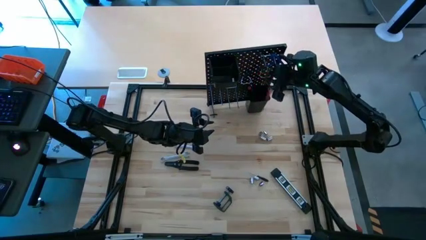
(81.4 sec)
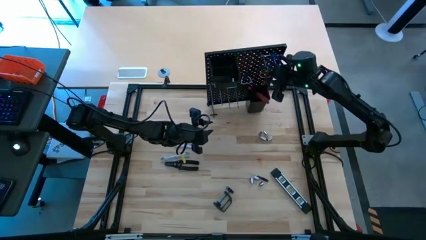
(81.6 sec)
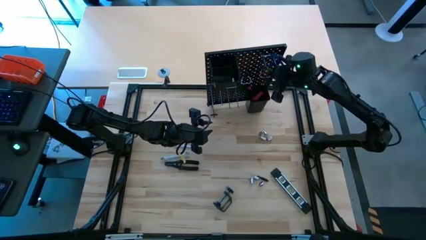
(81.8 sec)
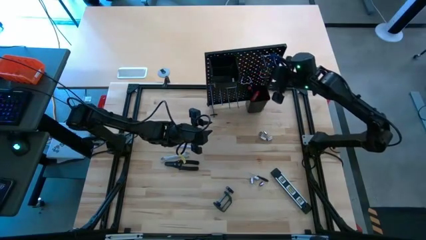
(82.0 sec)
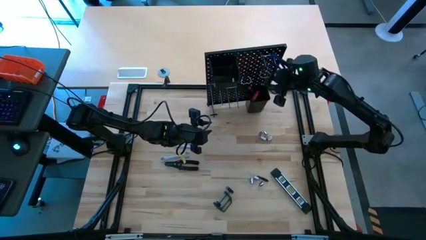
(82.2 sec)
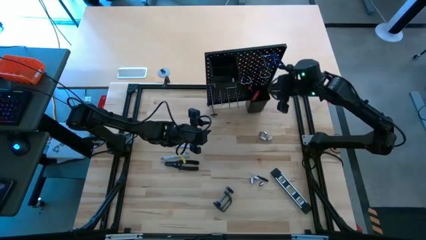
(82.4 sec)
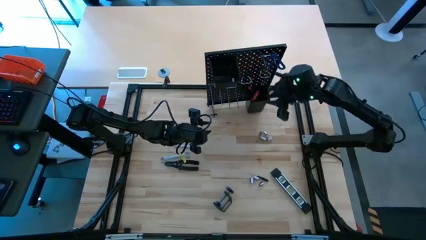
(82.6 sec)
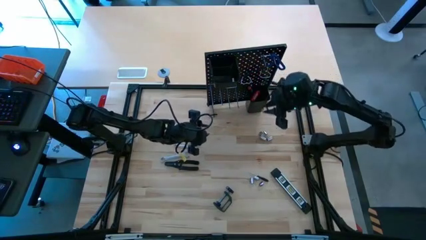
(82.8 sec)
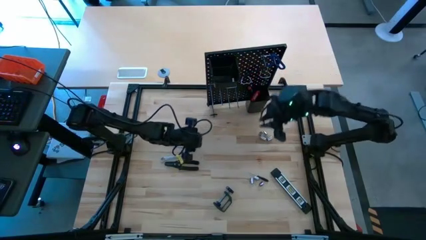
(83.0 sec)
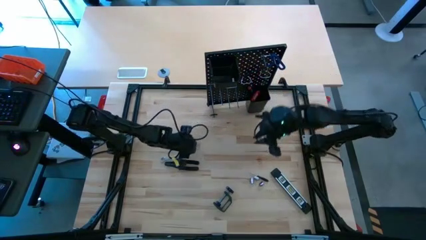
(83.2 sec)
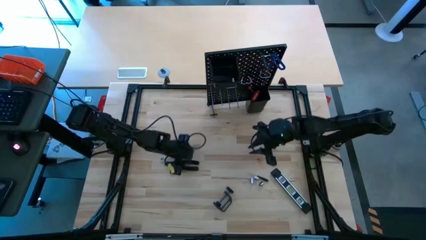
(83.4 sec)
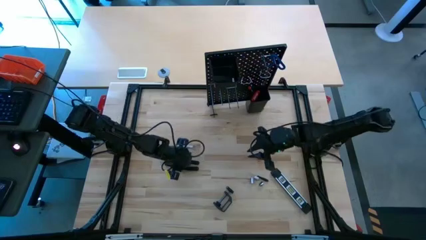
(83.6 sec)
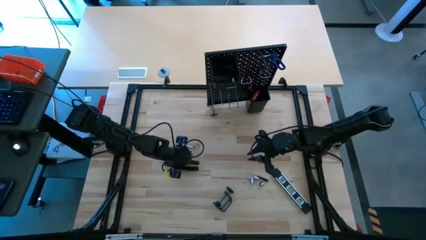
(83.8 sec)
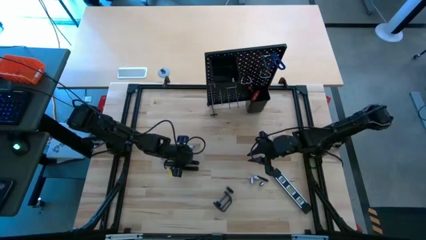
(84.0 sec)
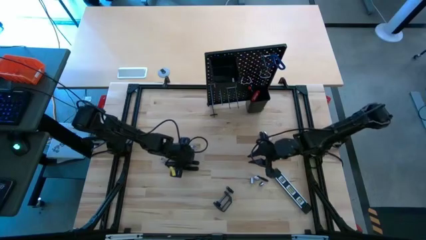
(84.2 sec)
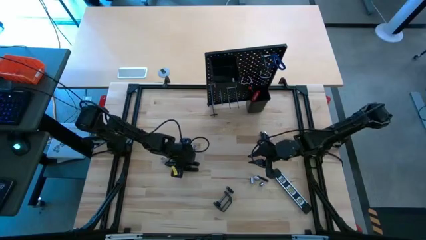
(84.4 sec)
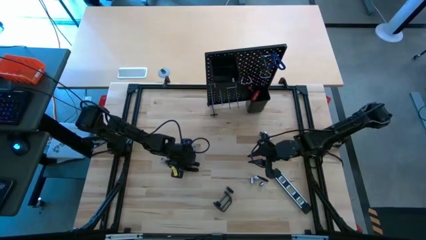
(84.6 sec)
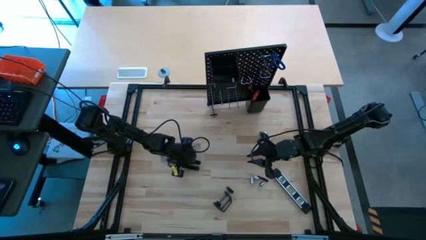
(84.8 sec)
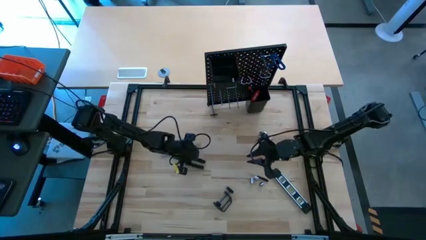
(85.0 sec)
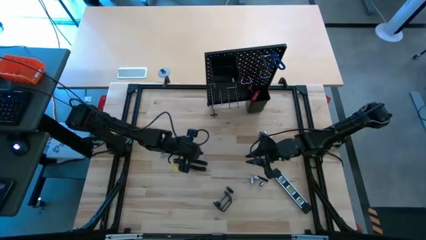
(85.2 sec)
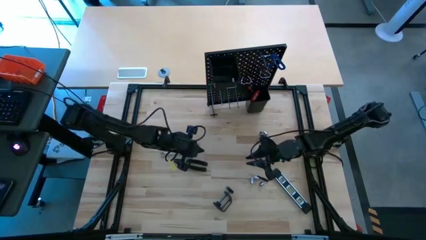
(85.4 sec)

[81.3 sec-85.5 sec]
Task: Hang tools onto peg board
Hang the black crimping pliers on the peg board

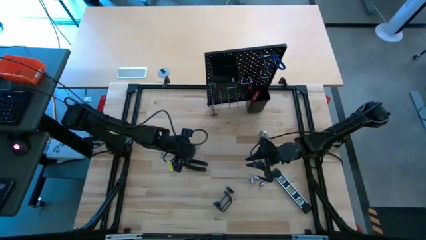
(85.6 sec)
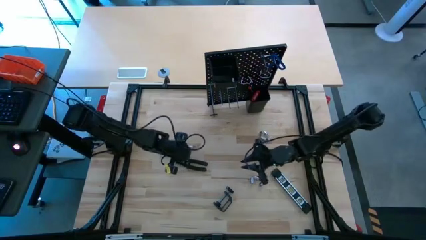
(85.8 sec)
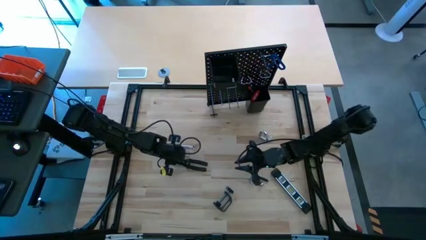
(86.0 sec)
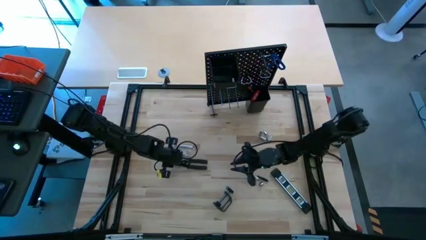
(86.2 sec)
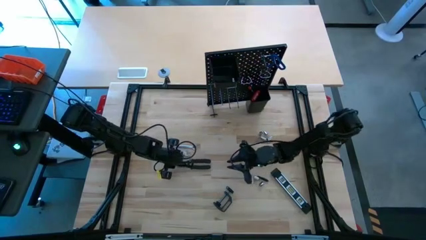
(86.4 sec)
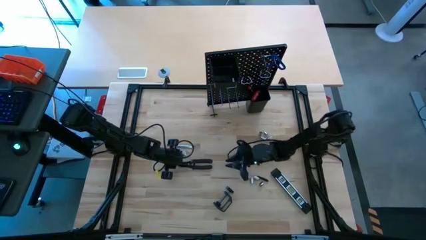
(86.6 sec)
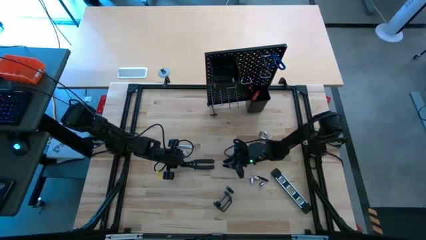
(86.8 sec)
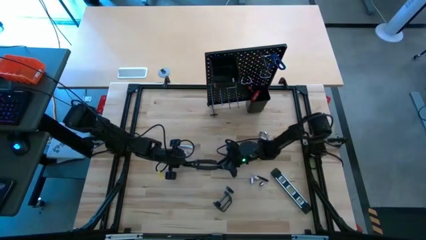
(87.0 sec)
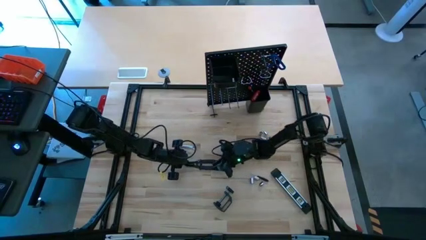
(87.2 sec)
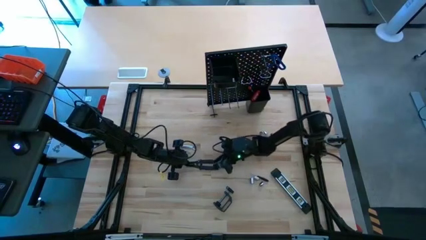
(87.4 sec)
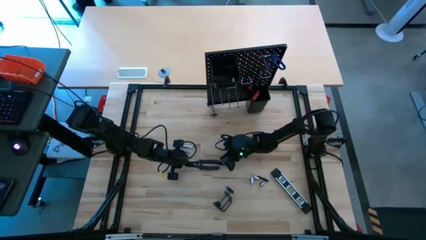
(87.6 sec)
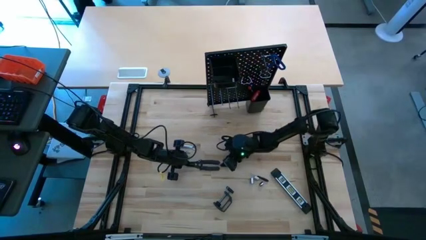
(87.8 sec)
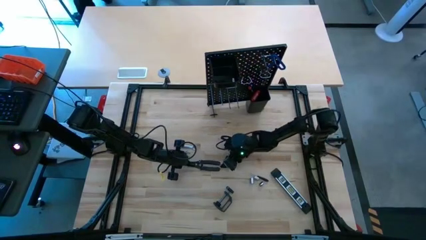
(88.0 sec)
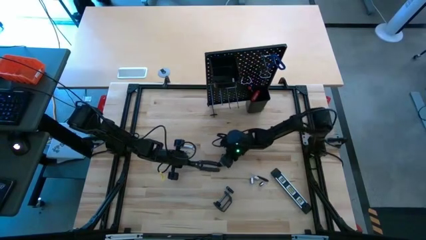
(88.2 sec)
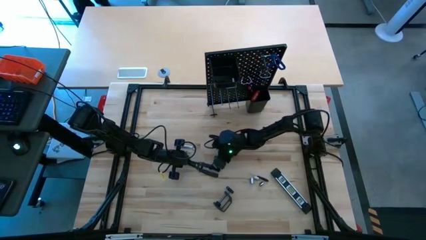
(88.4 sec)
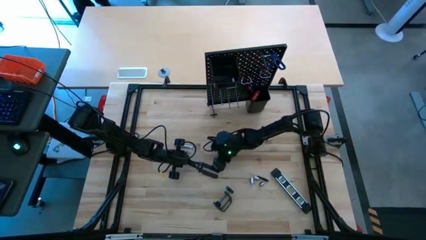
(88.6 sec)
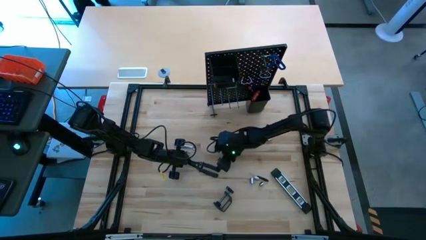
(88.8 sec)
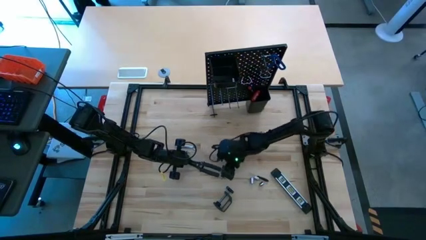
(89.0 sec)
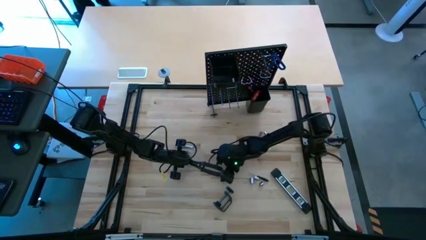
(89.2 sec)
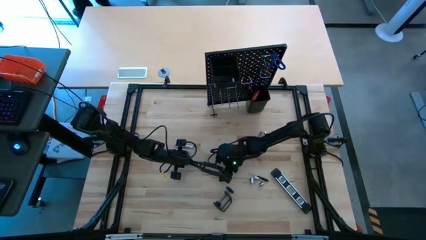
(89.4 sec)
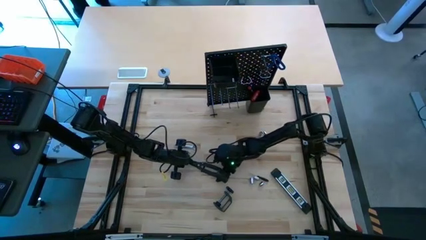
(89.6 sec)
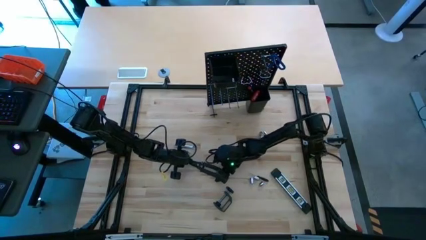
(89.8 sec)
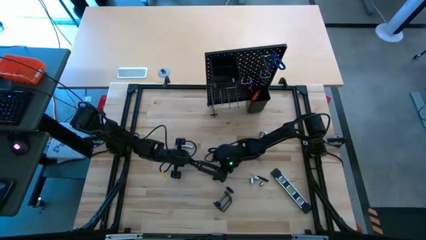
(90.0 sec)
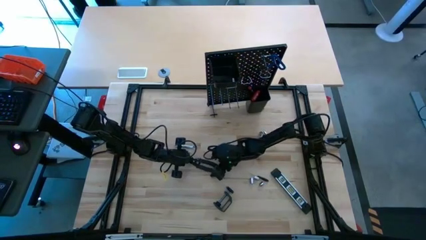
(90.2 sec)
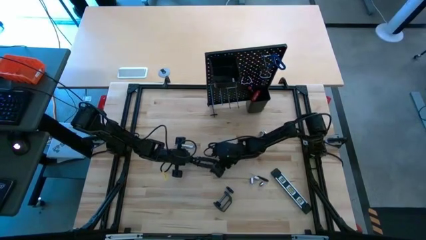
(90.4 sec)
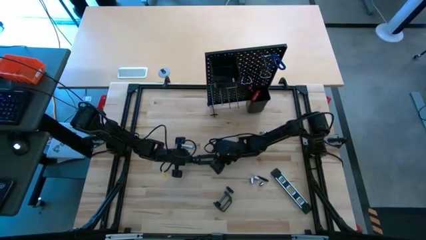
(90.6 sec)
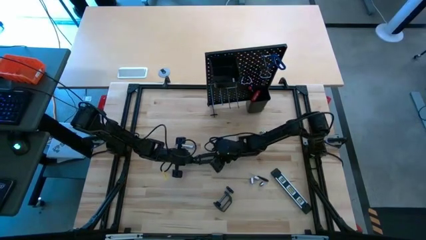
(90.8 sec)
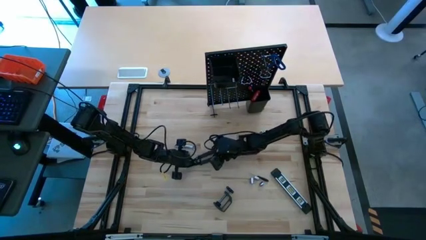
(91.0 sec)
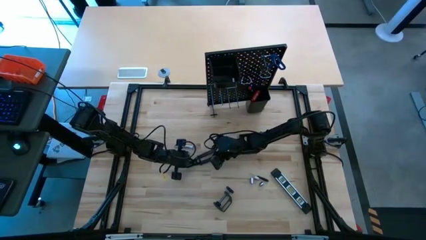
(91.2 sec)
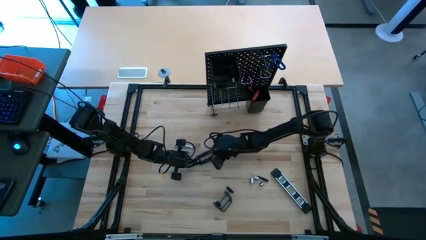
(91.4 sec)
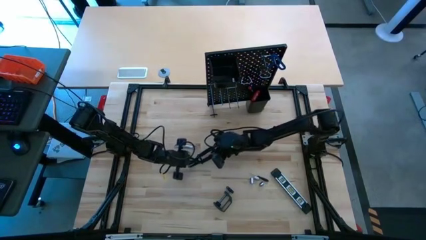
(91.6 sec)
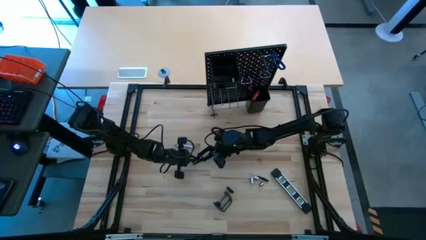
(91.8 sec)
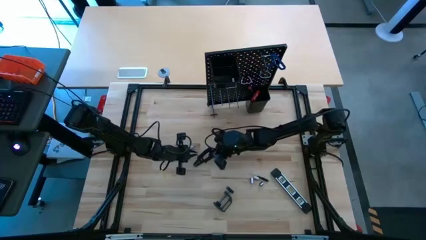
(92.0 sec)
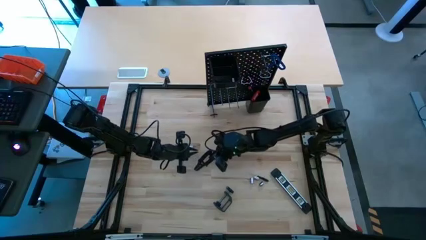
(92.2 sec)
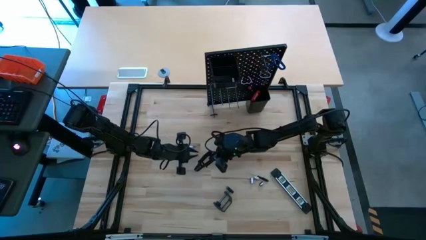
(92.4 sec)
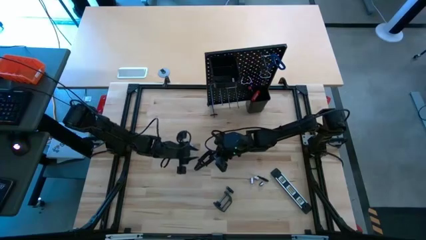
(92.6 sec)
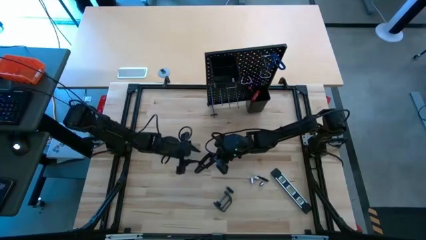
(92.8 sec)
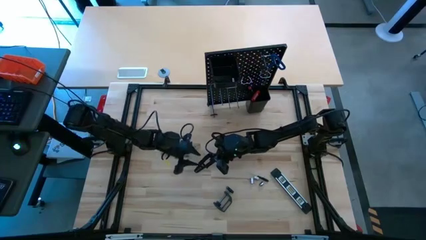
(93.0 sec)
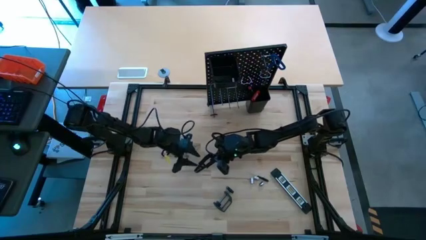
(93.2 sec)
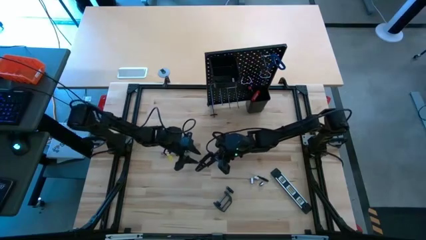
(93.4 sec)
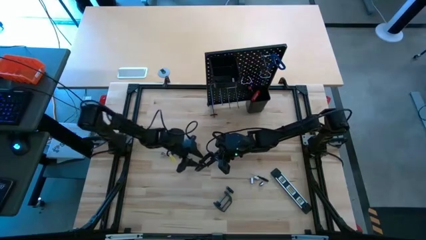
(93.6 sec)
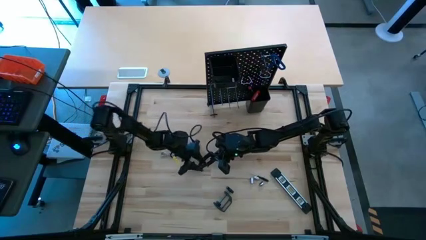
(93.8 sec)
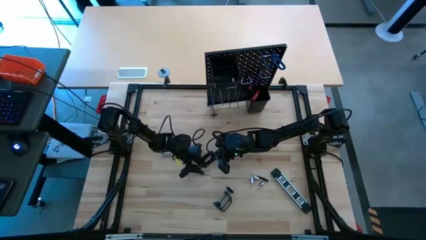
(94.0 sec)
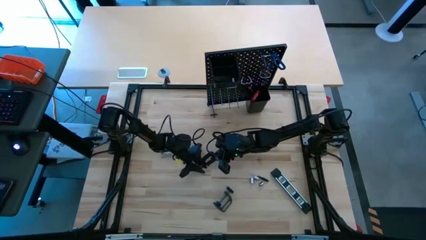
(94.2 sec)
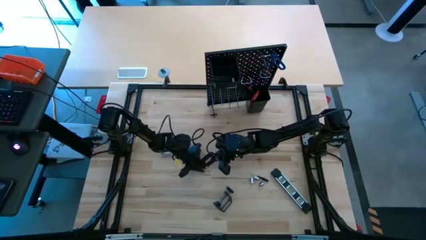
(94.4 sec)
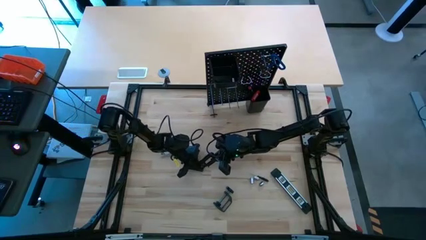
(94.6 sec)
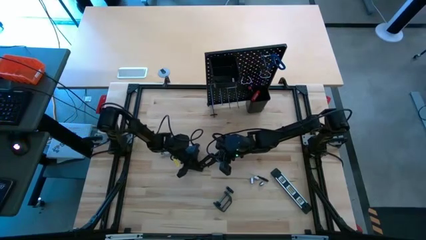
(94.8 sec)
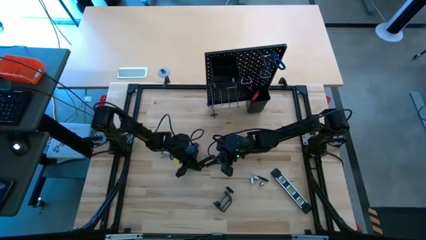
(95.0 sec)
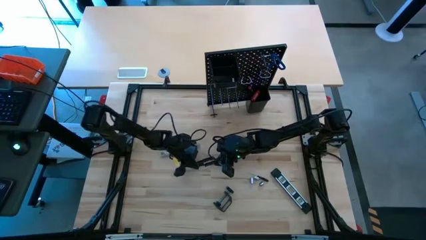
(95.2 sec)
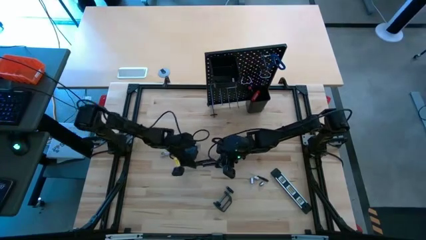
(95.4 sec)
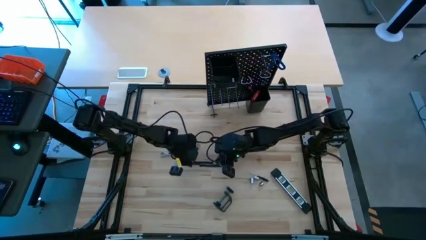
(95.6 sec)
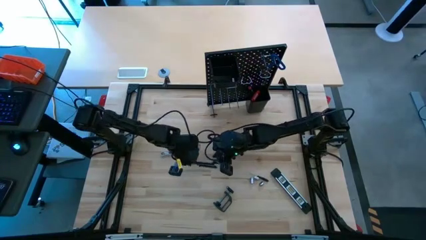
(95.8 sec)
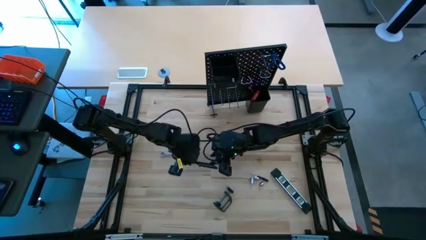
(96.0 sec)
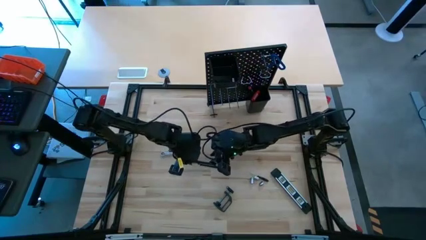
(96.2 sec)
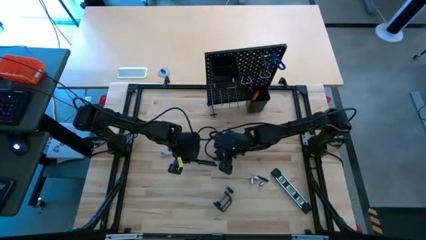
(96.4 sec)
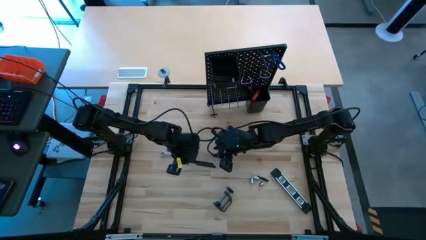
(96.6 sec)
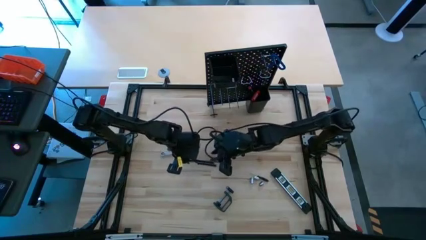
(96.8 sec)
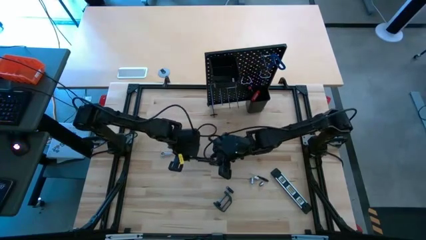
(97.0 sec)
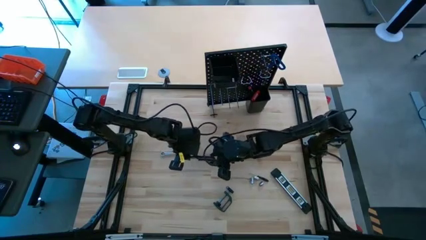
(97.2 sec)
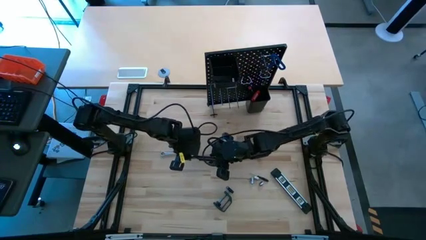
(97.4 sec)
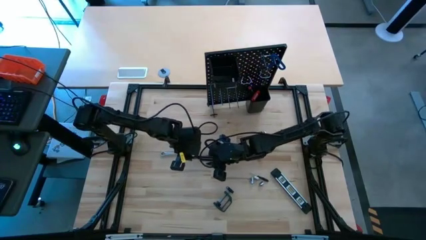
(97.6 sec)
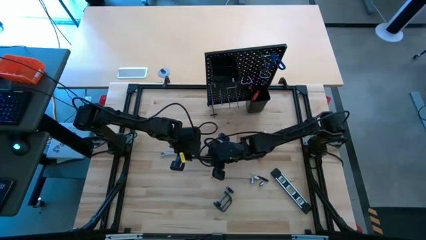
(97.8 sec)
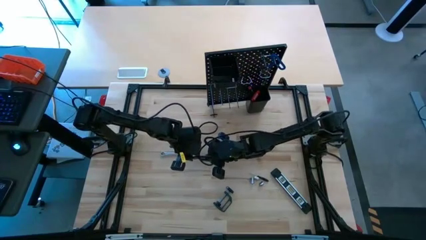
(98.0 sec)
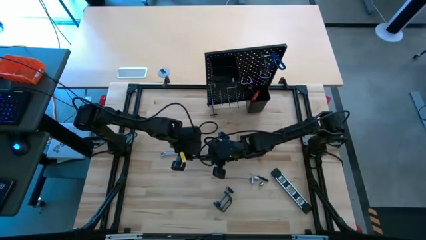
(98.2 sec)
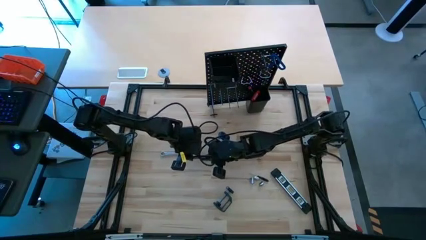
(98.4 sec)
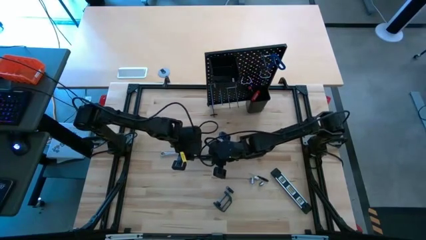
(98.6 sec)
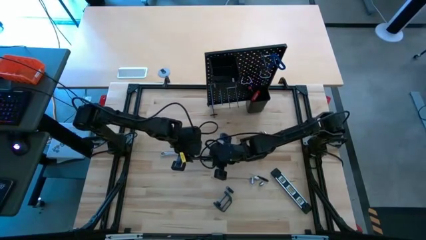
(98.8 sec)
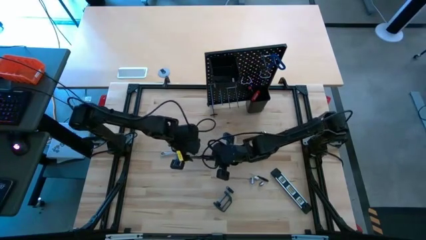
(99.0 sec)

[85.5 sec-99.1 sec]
Hang the black crimping pliers on the peg board
